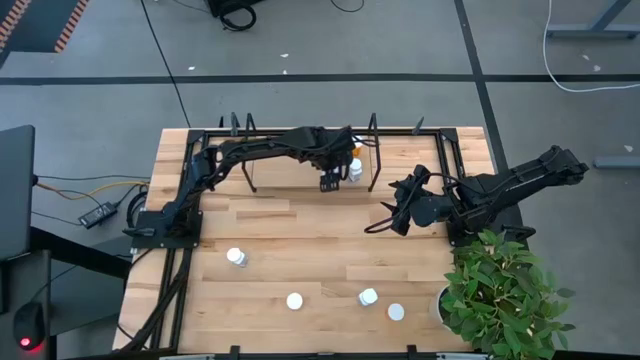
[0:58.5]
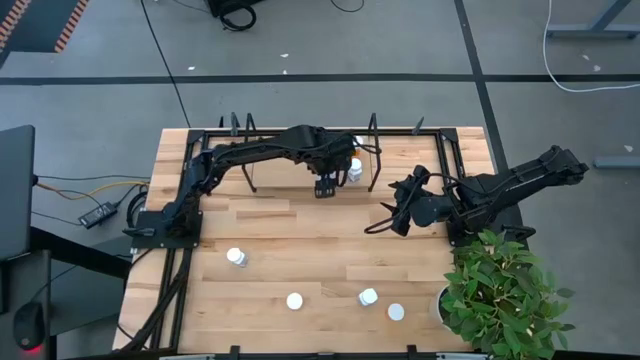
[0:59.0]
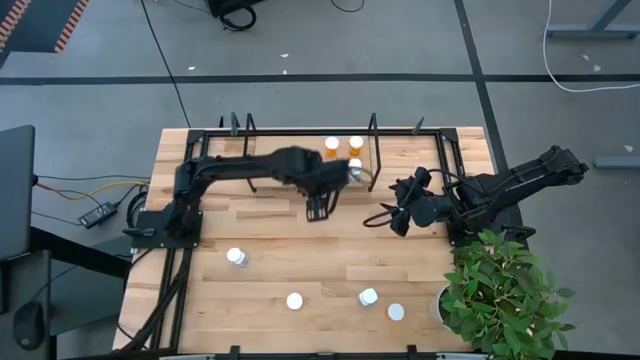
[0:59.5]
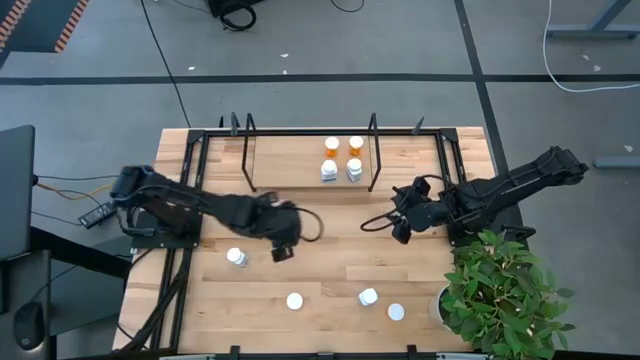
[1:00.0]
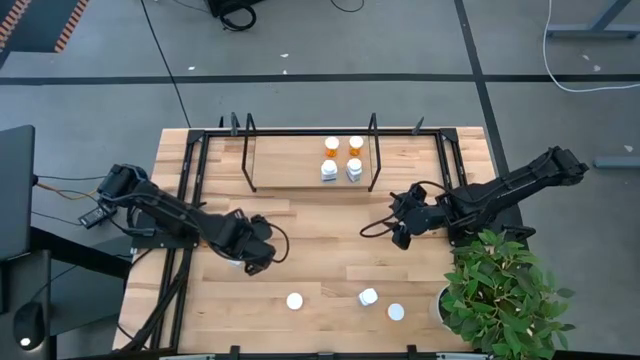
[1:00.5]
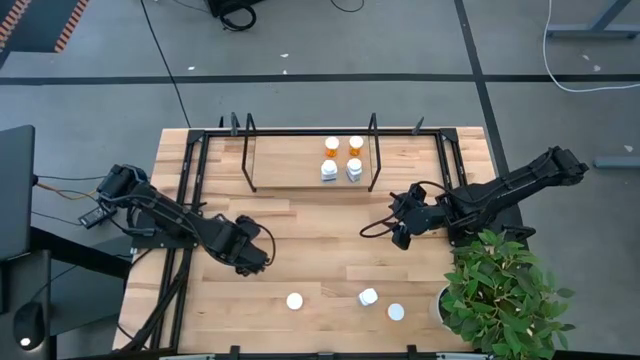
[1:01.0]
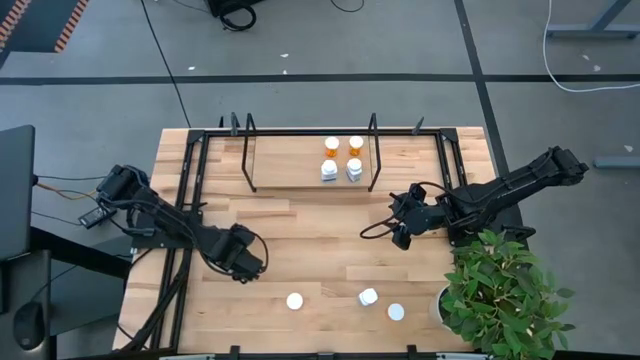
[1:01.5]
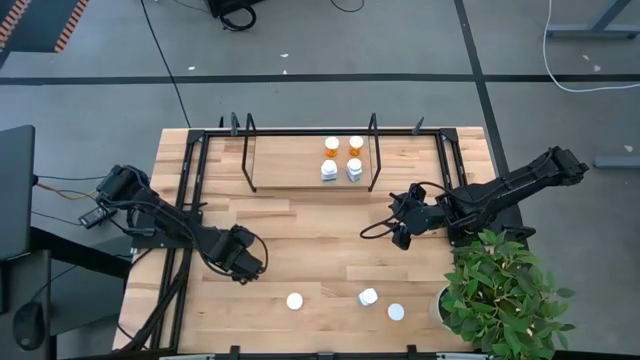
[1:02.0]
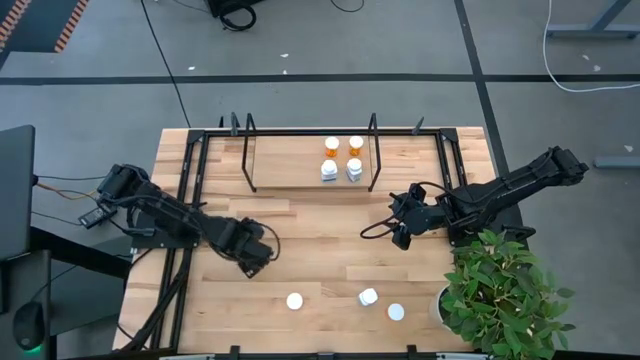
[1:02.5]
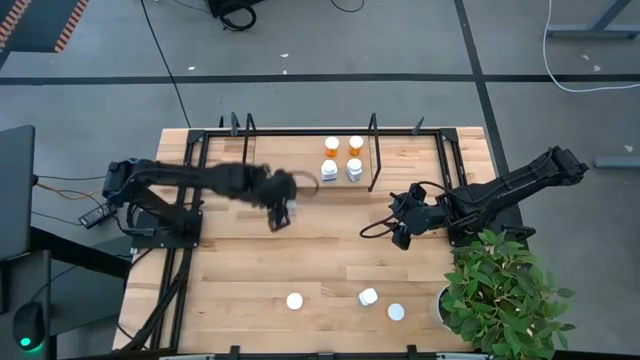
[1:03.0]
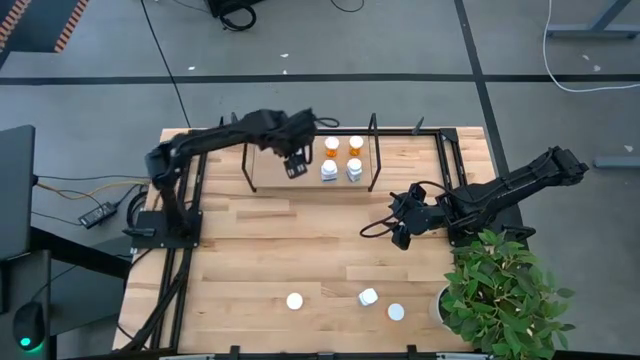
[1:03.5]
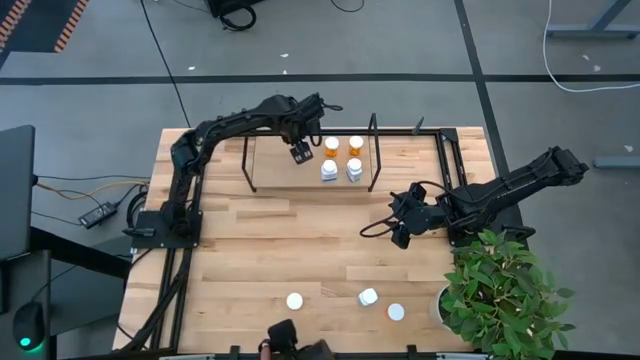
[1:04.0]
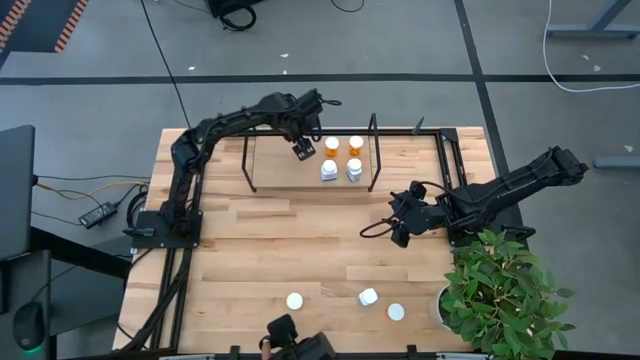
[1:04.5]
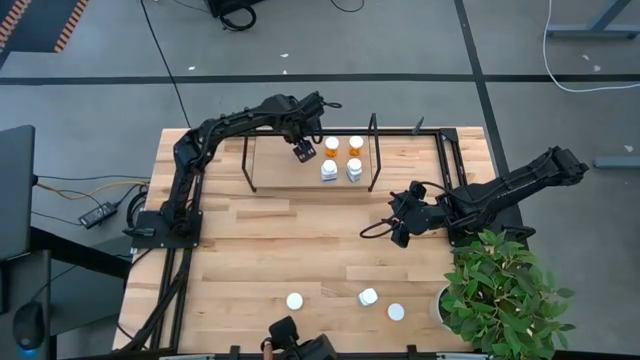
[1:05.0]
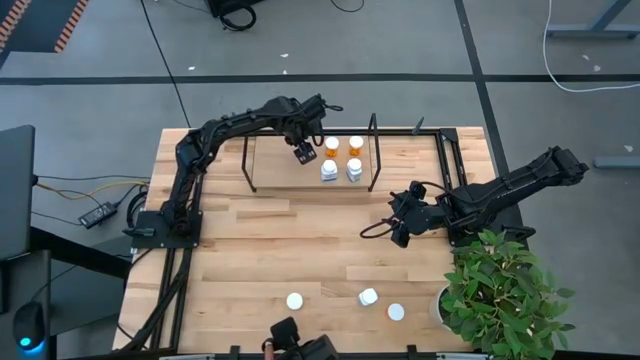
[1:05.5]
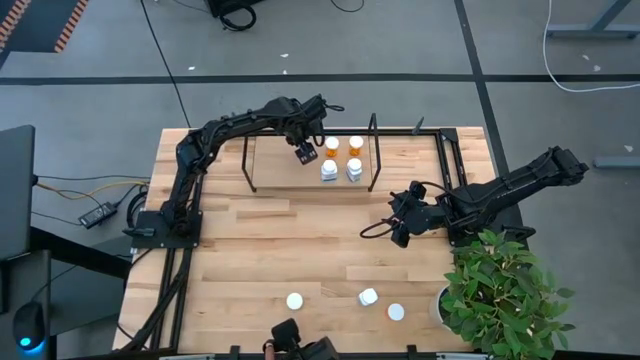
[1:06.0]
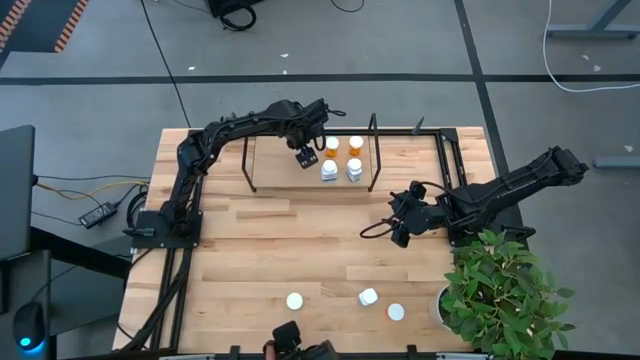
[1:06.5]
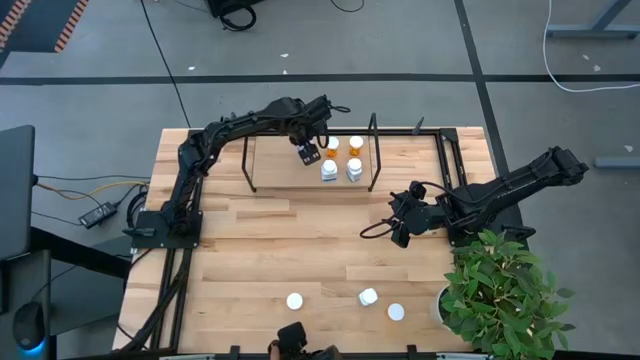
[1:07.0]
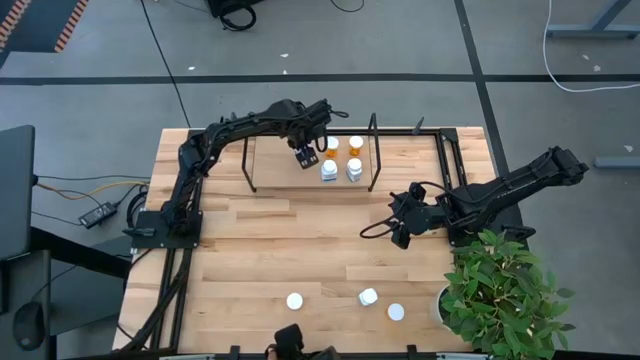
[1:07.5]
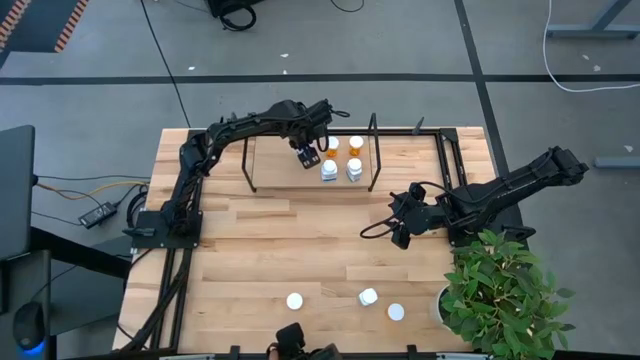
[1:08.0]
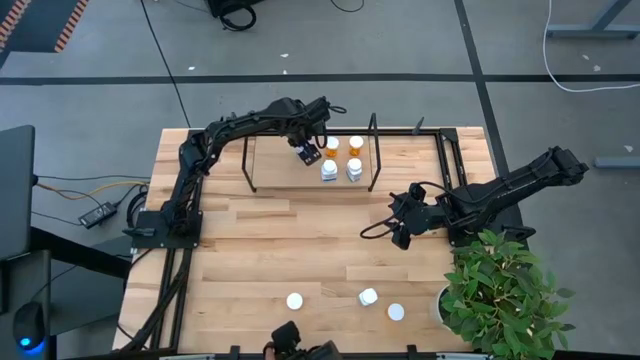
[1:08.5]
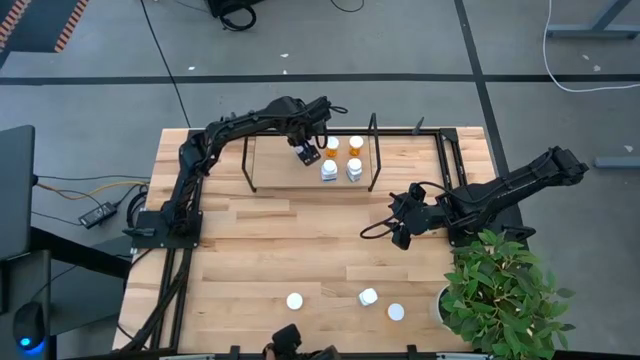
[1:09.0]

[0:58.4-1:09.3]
Task: Pick and place medicine bottles onto shelf by color
Put the white pill bottle on the shelf

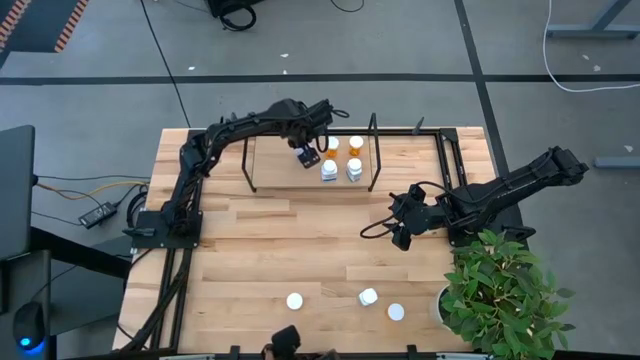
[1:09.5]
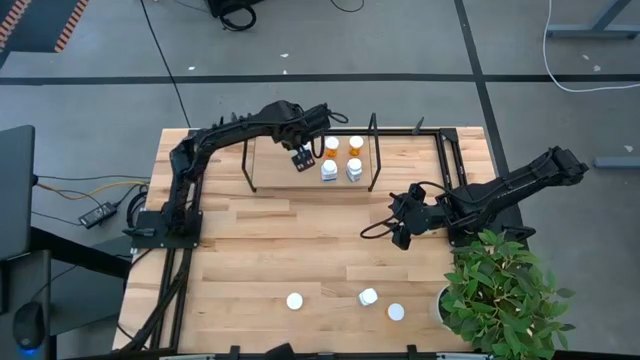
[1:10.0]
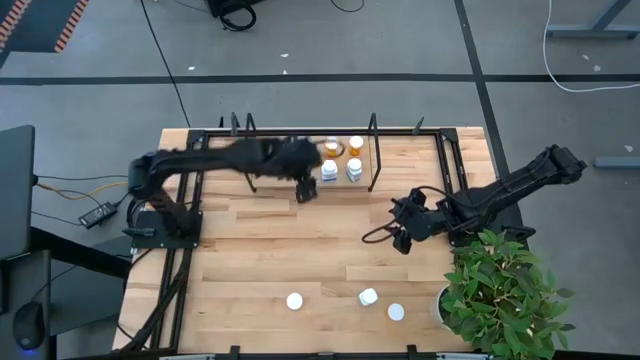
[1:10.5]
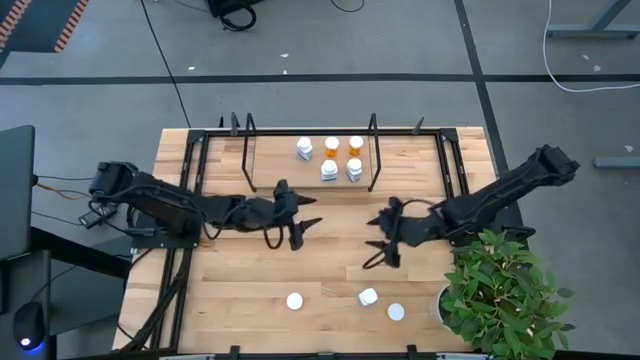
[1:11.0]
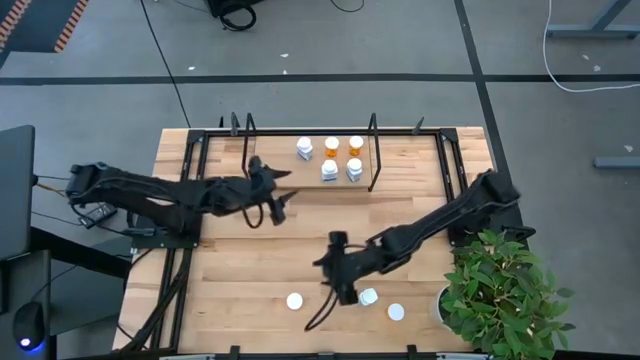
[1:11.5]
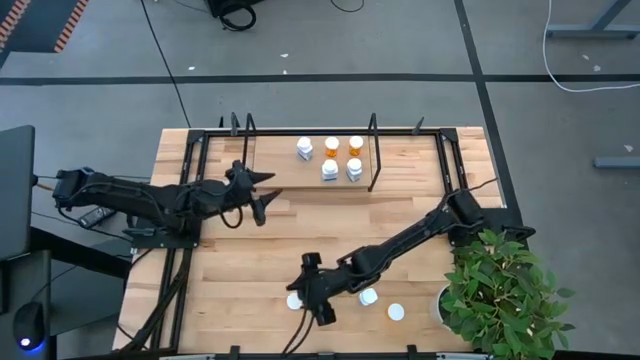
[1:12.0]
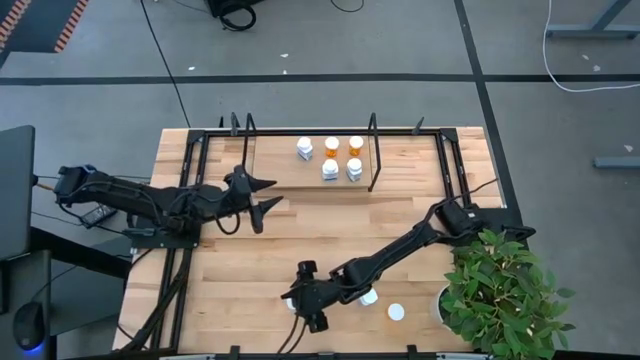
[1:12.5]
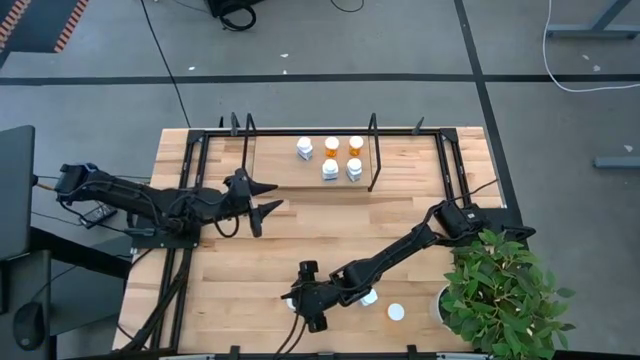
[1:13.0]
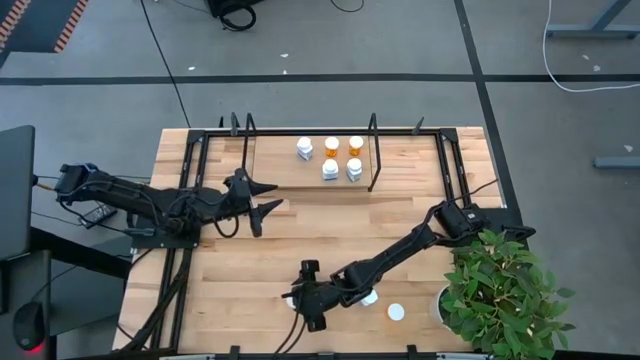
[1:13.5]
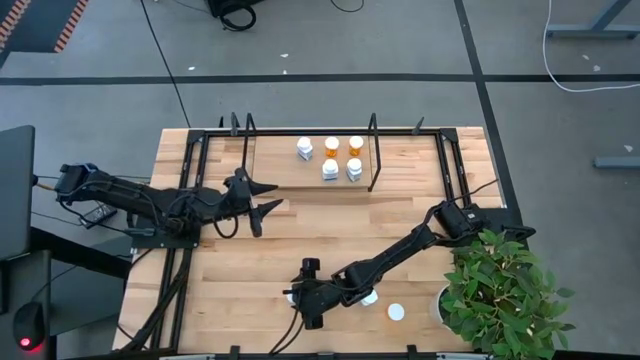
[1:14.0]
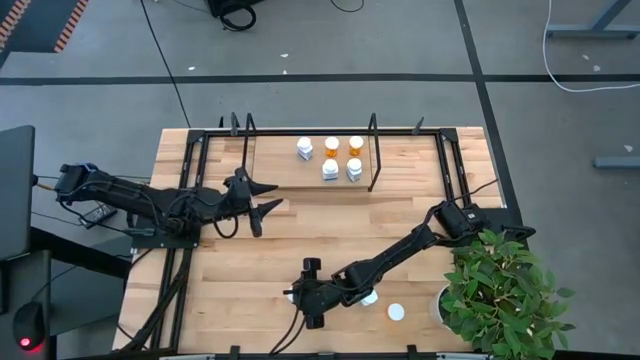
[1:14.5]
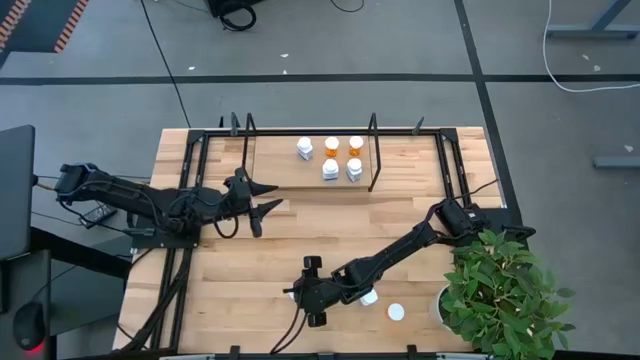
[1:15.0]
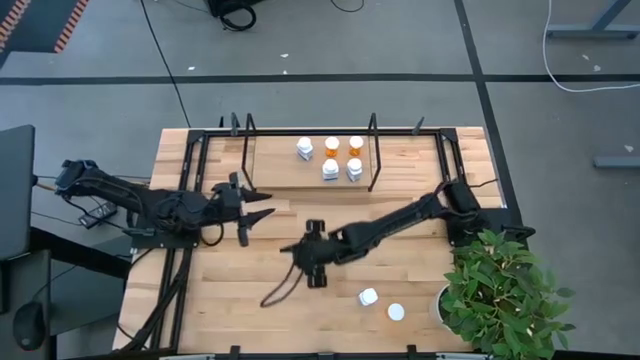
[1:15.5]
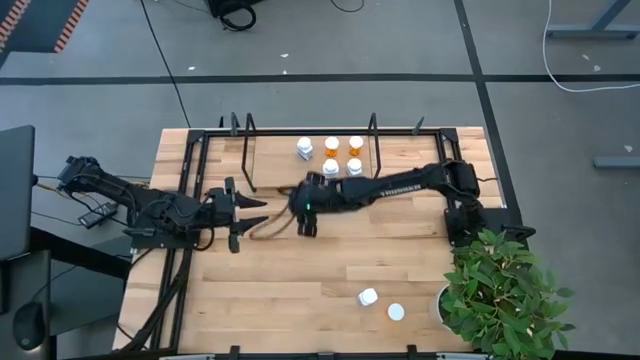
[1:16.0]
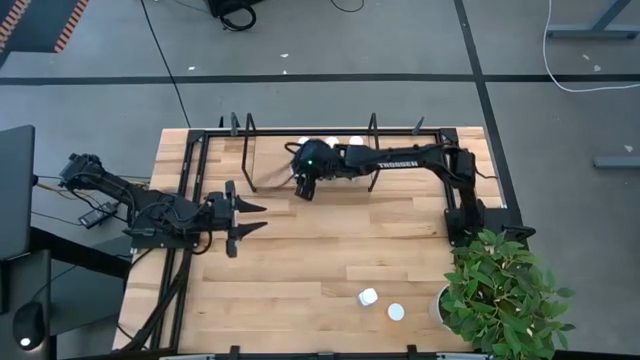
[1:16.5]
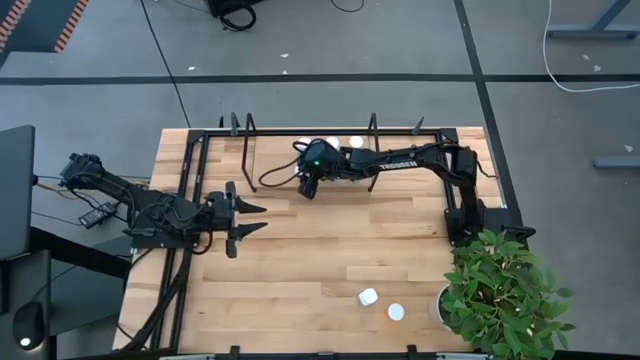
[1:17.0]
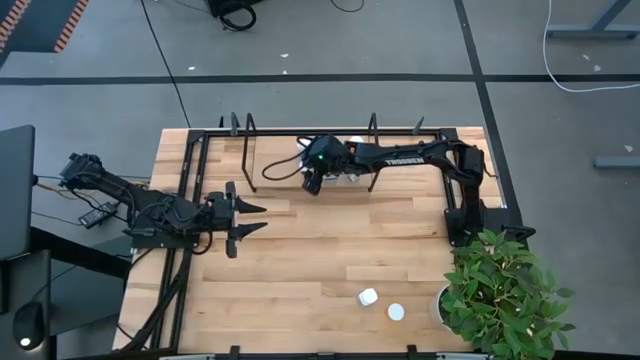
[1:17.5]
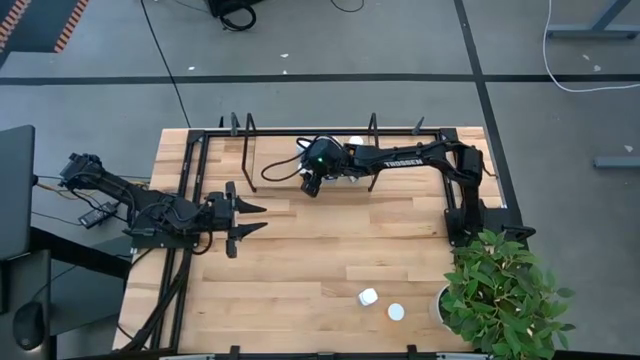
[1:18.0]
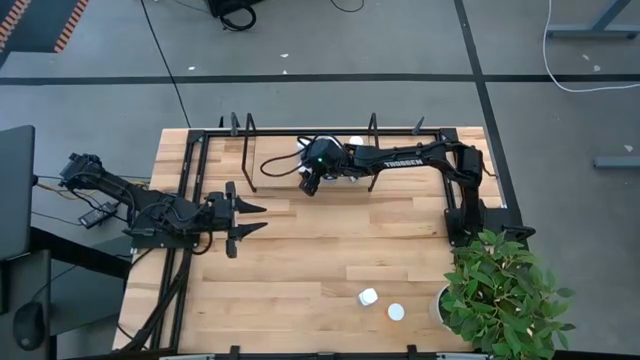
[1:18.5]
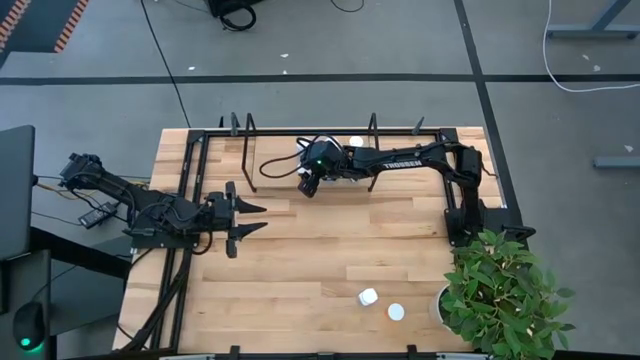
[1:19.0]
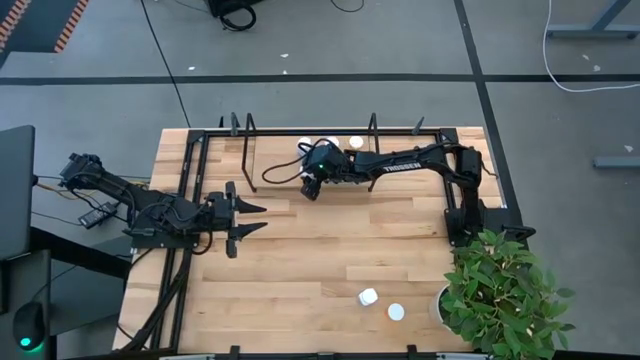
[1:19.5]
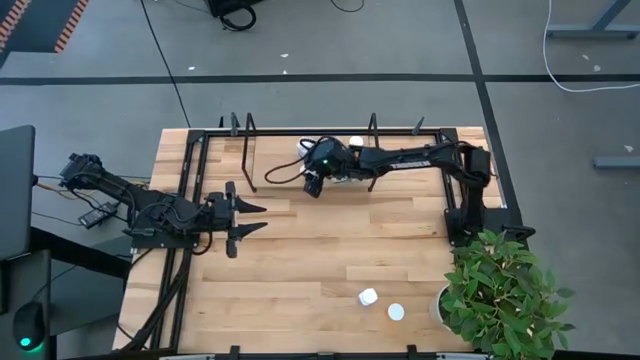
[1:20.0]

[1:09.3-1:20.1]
Put the orange pill bottle on the shelf
